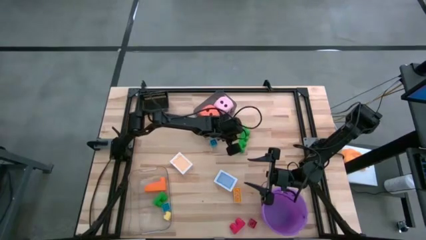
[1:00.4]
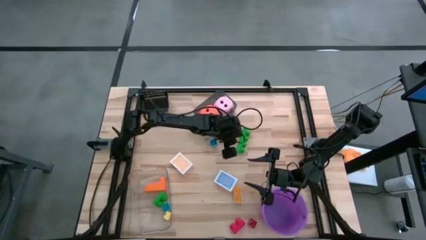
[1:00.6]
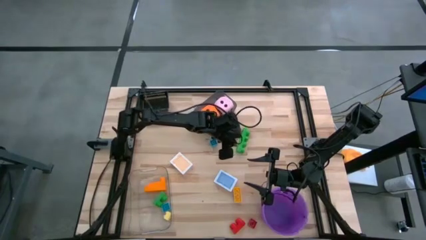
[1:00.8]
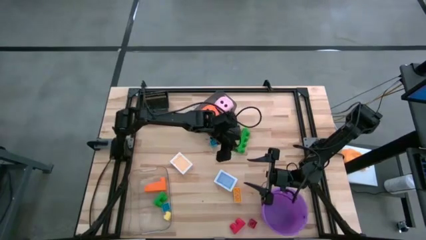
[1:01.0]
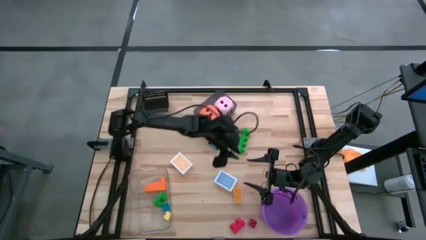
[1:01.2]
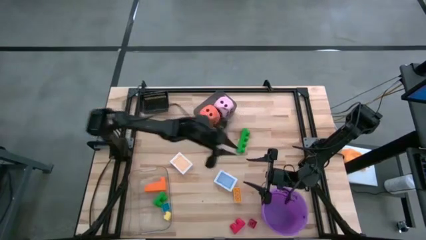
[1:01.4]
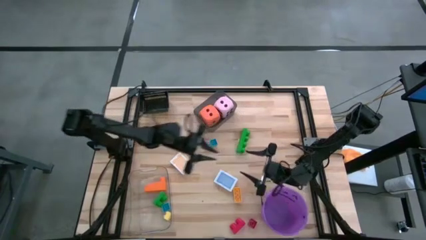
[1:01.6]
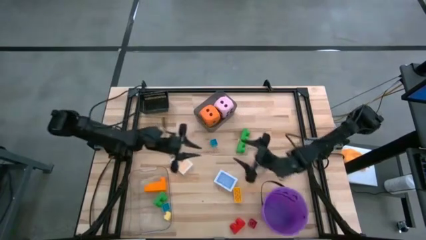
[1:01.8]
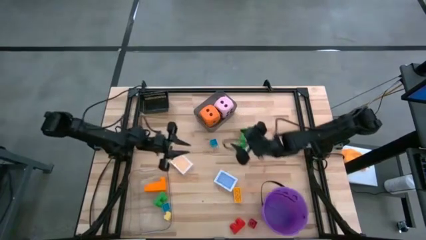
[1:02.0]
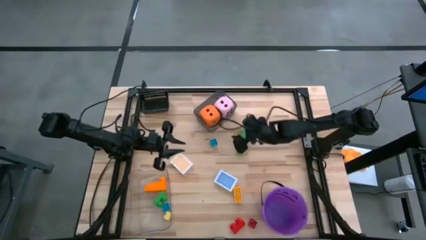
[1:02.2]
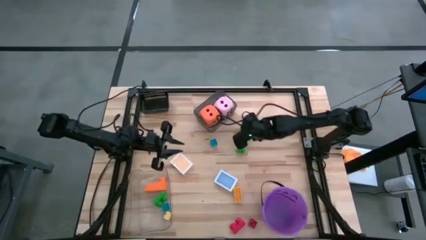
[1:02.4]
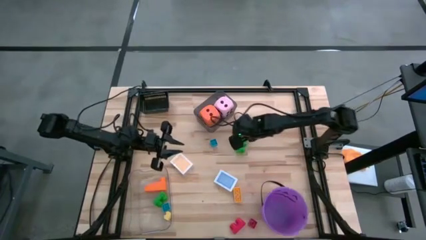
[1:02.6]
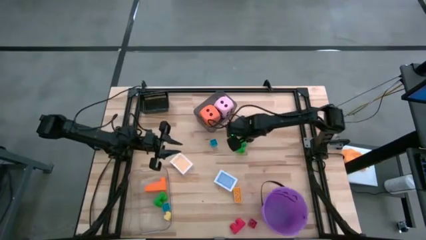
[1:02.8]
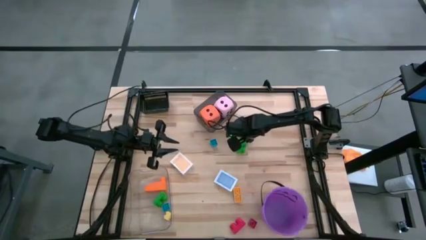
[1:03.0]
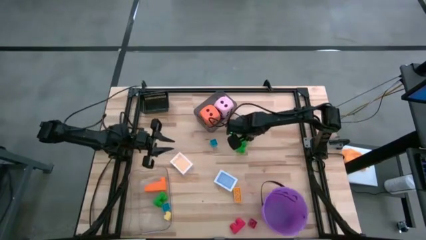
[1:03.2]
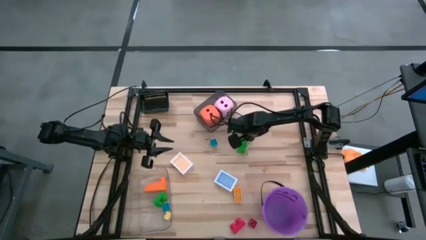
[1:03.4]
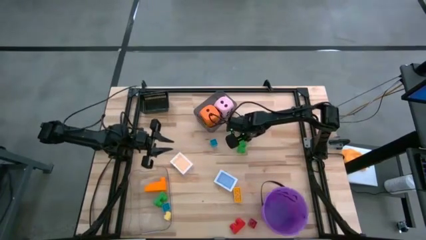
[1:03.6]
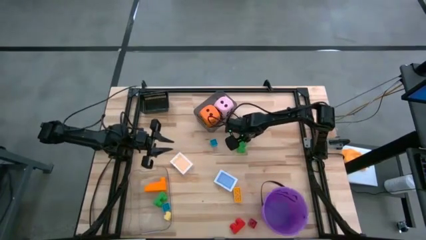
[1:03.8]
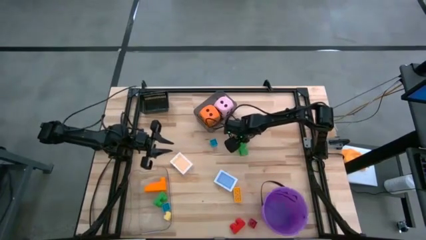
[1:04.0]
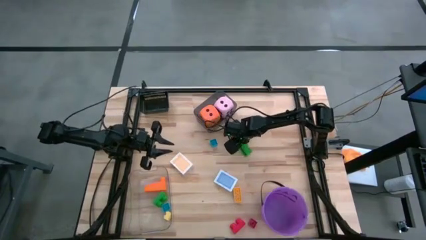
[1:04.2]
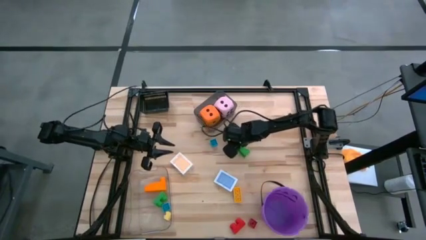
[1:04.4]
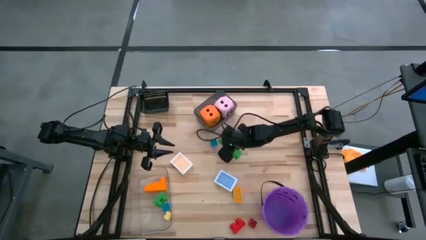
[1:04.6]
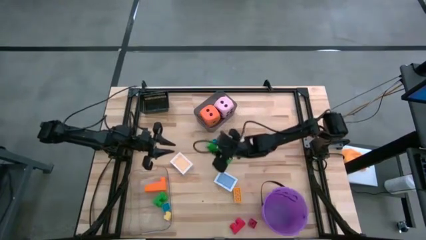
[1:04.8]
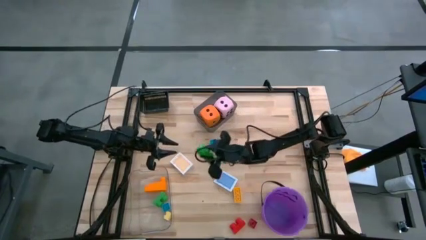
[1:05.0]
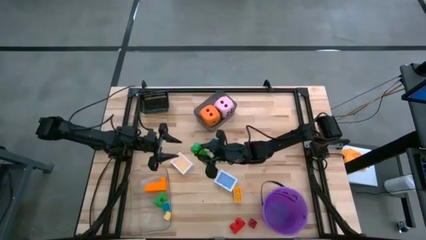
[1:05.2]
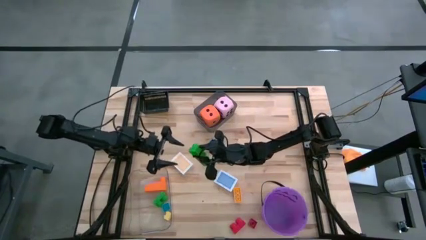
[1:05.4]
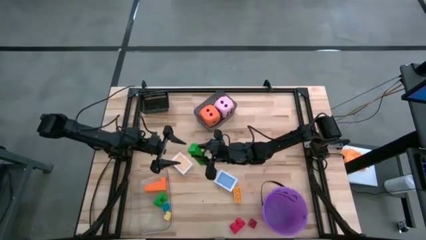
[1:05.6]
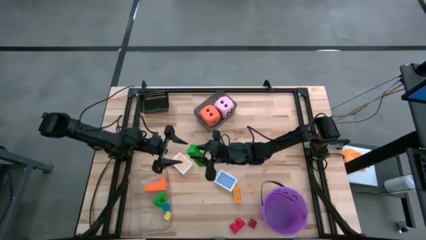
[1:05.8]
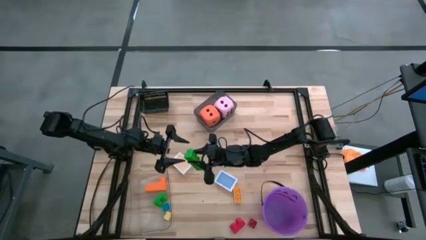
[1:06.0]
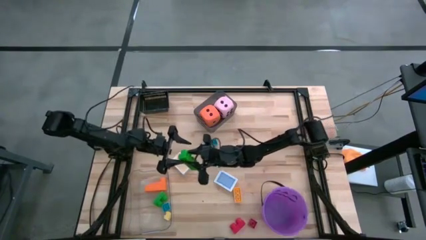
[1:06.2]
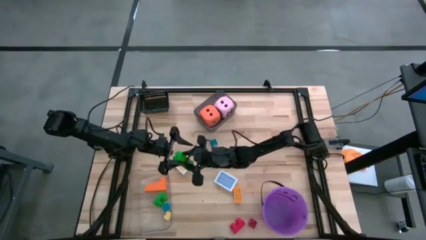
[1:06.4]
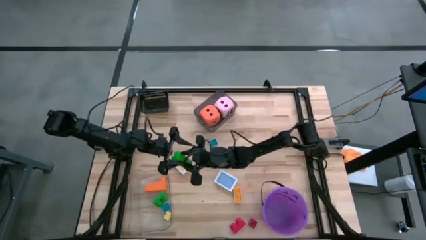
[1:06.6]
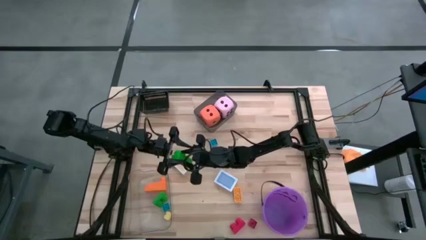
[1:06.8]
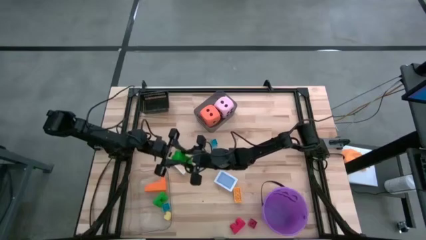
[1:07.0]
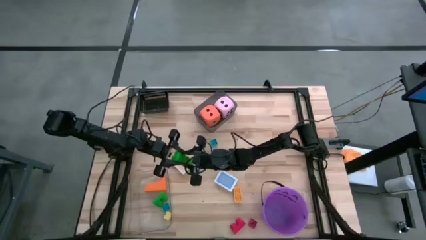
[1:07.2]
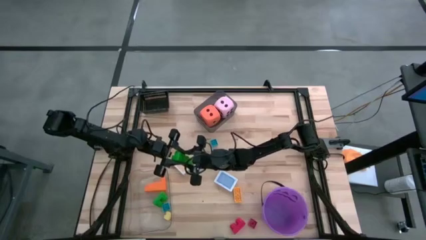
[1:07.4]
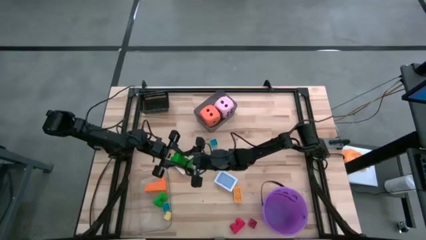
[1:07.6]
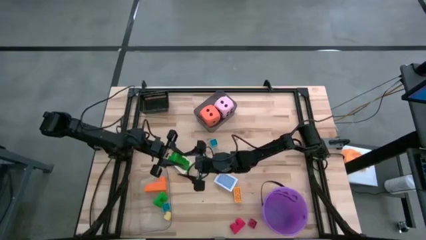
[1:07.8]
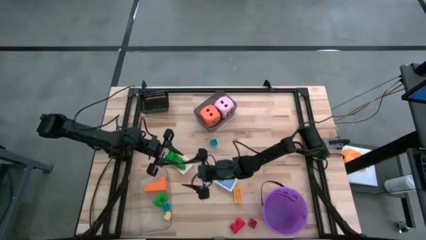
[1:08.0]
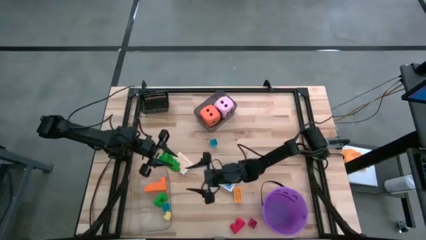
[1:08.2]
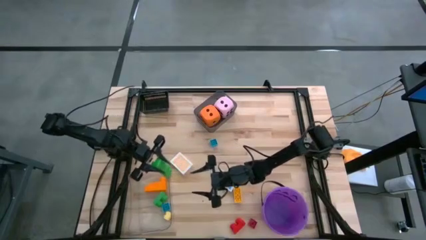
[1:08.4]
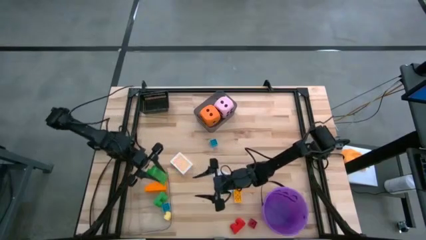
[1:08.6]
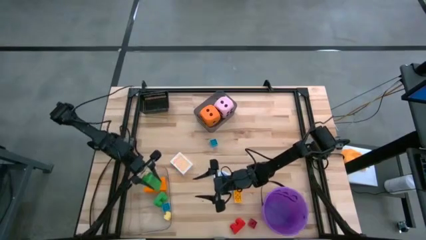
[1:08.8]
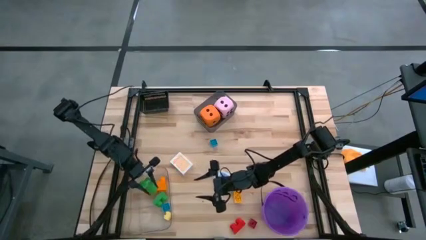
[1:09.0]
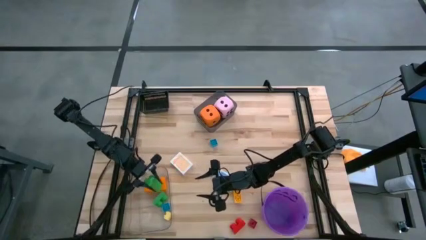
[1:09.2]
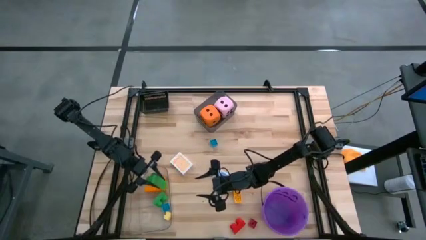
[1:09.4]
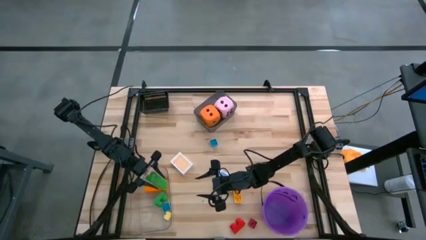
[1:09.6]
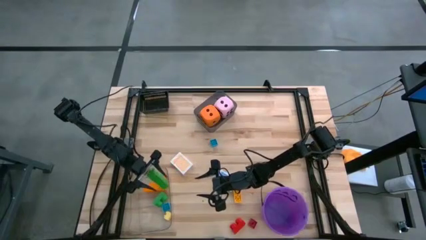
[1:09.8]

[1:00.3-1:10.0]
Task: Pick & Place Toys
Put the green game piece into the transparent bin

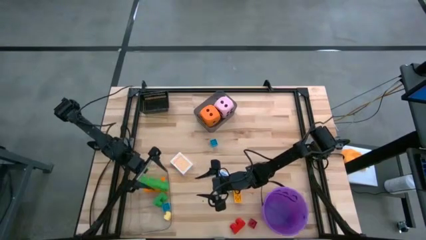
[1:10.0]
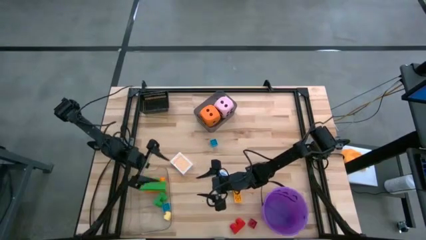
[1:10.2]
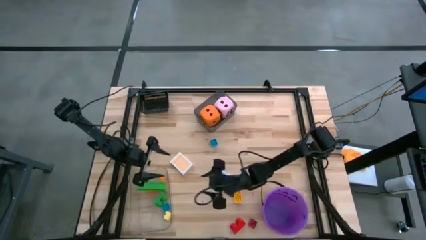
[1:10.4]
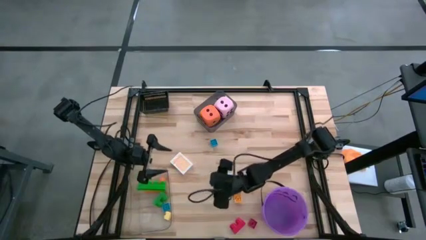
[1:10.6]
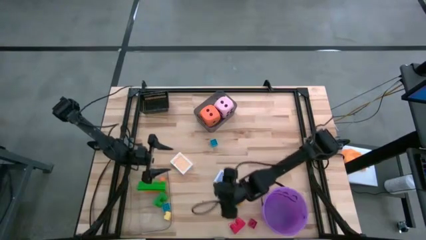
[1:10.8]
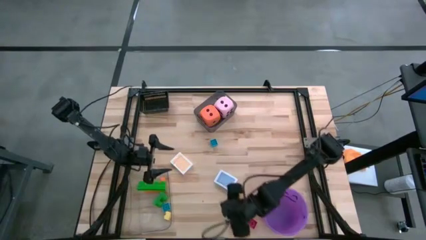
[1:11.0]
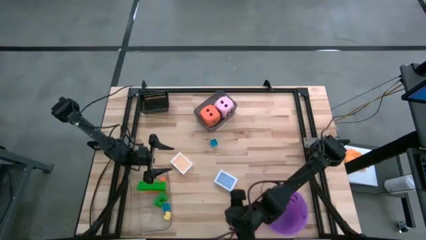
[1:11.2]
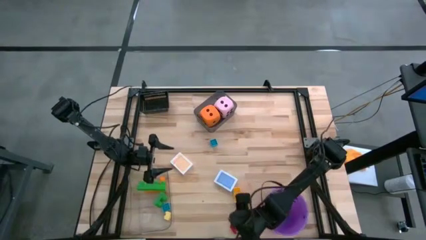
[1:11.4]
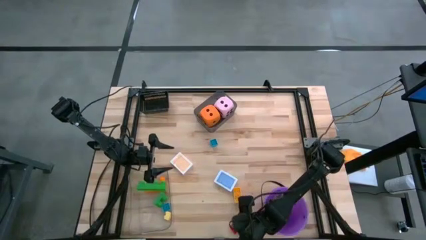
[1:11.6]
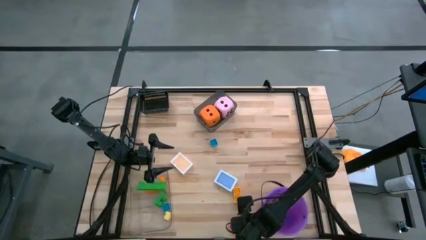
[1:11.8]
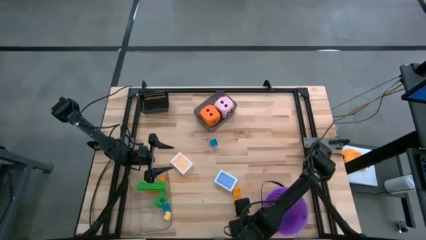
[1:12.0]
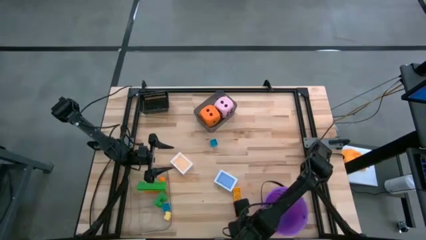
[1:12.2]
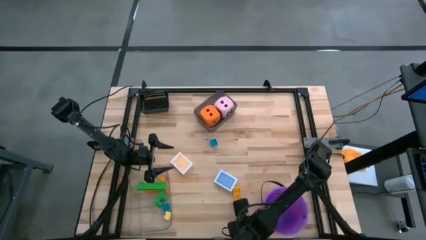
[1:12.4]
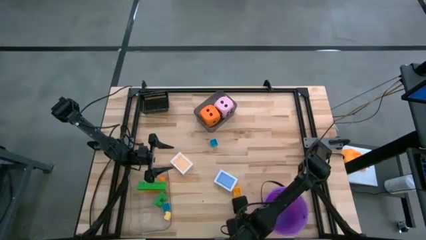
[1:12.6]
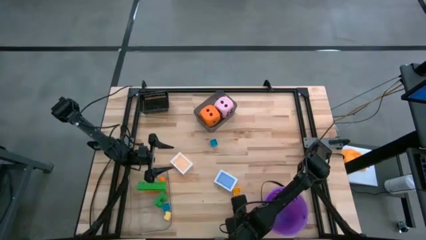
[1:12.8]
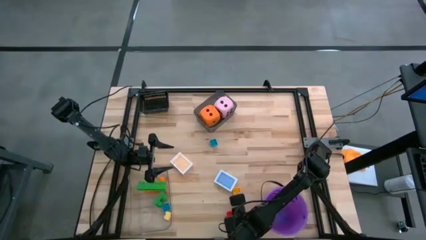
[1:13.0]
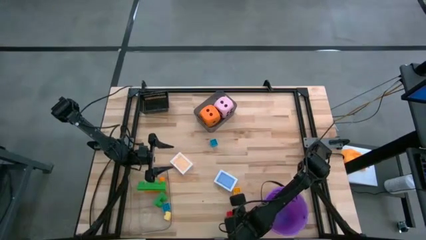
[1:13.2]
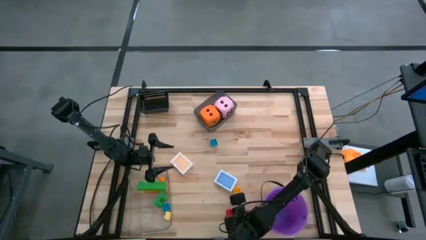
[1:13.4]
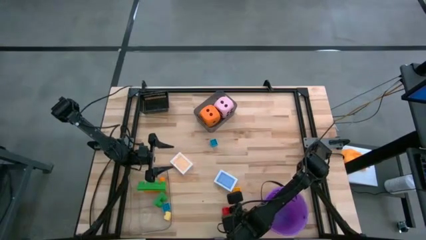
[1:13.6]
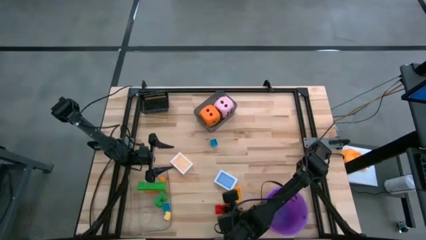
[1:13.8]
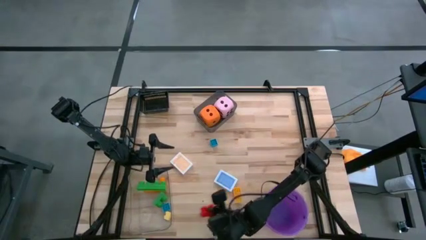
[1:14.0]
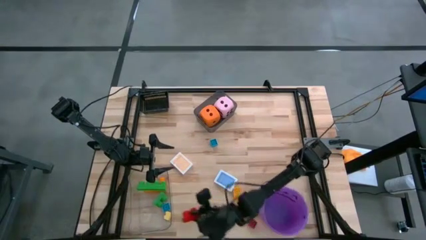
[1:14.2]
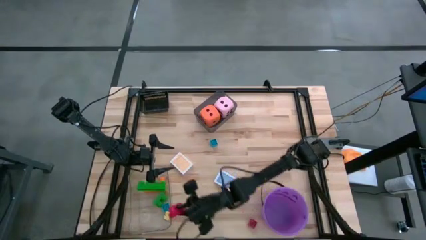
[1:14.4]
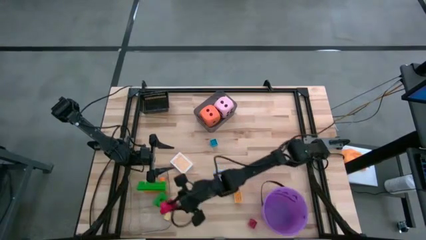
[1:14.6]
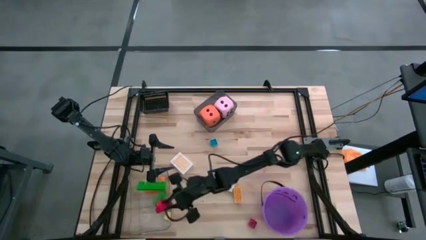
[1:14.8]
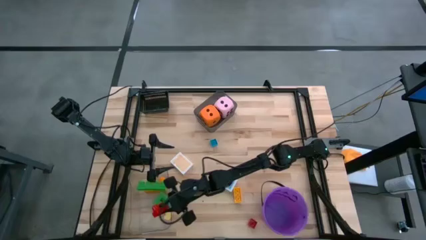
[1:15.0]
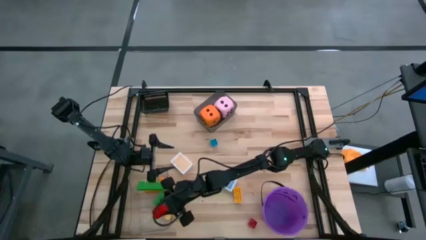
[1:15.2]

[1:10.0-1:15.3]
Put the red game piece into the transparent bin
